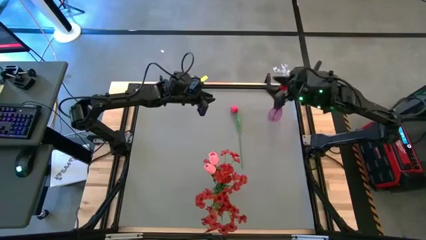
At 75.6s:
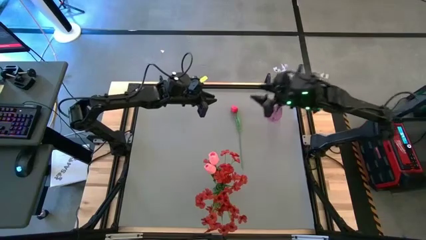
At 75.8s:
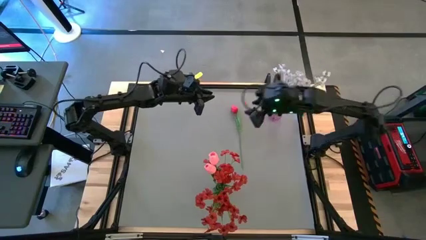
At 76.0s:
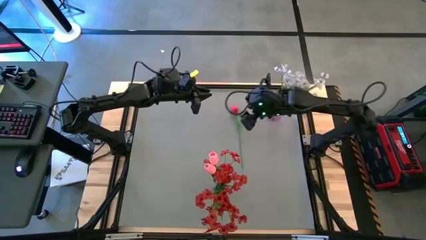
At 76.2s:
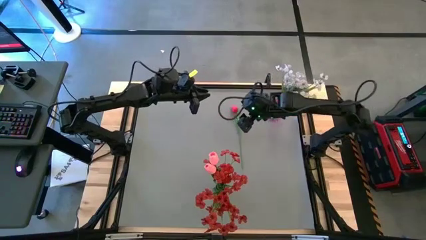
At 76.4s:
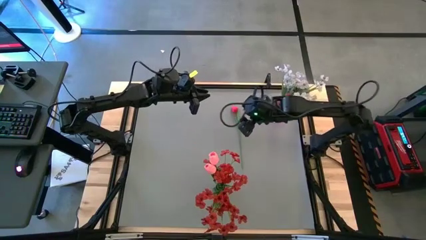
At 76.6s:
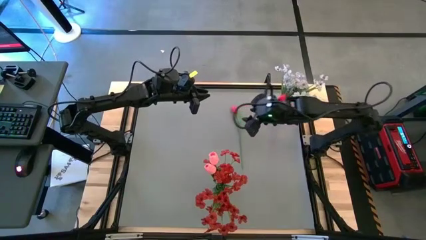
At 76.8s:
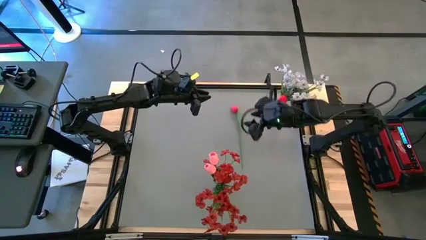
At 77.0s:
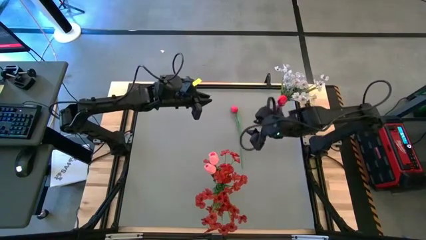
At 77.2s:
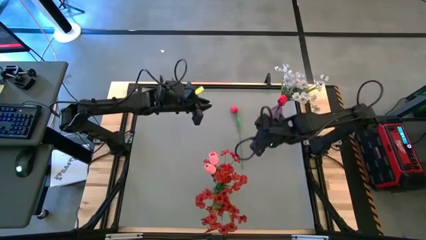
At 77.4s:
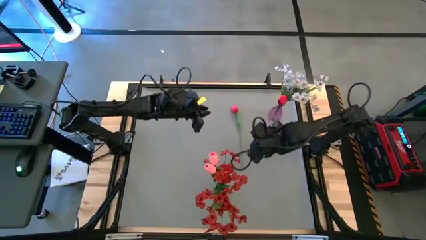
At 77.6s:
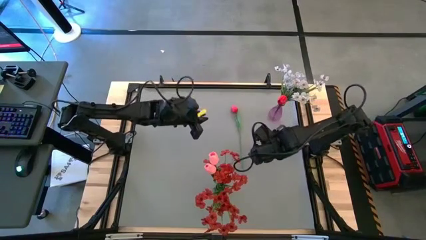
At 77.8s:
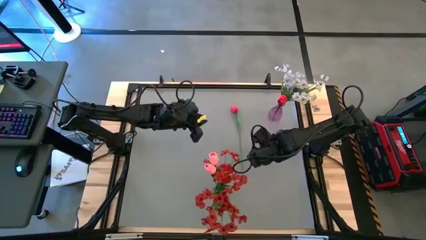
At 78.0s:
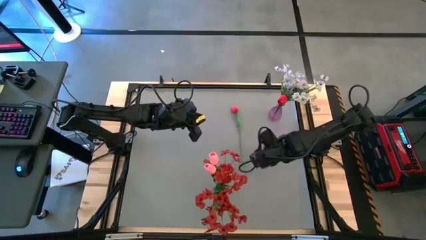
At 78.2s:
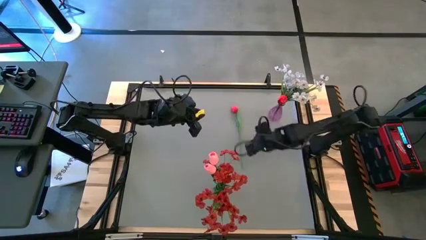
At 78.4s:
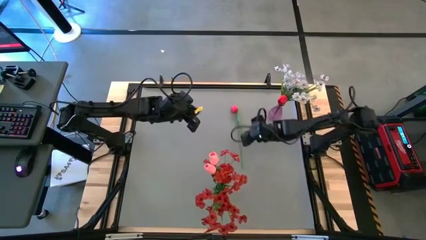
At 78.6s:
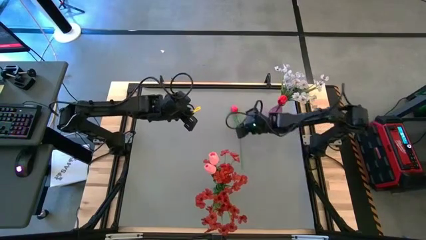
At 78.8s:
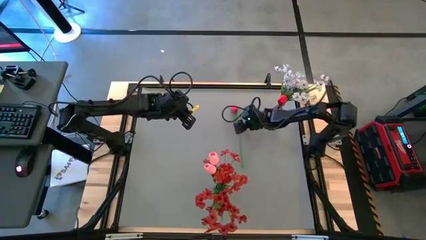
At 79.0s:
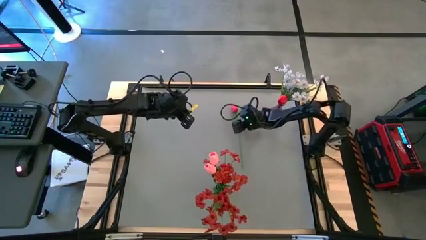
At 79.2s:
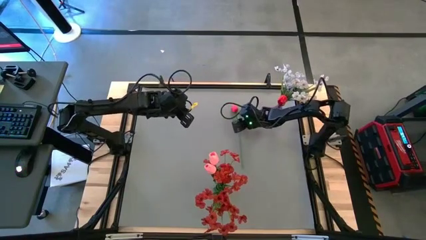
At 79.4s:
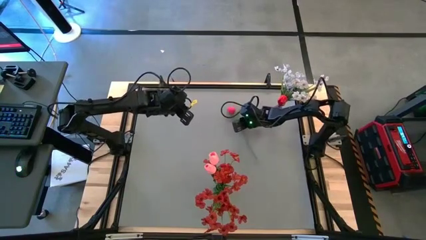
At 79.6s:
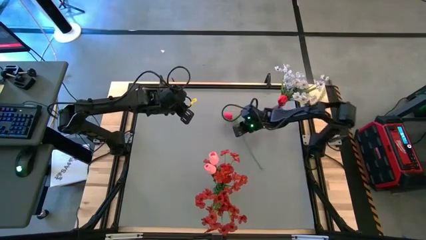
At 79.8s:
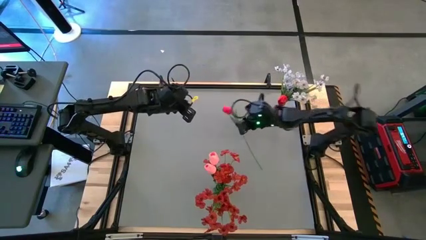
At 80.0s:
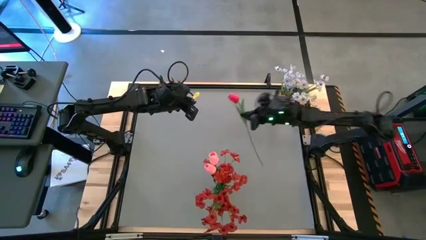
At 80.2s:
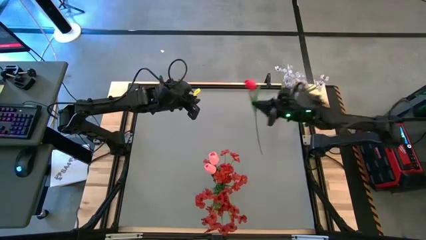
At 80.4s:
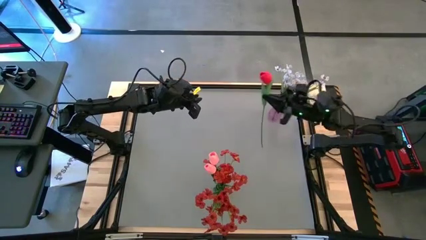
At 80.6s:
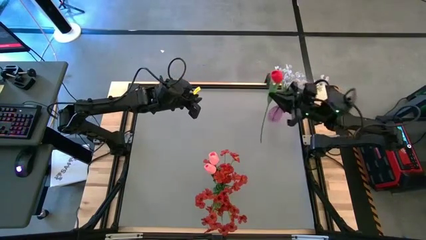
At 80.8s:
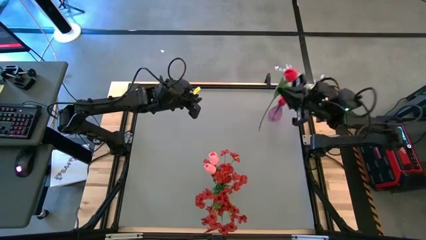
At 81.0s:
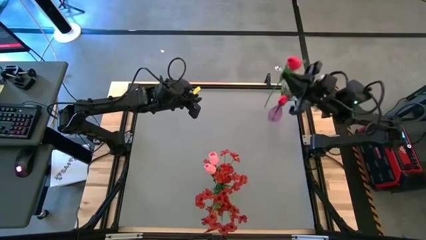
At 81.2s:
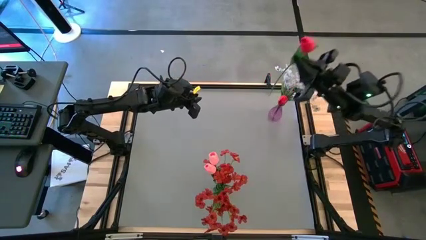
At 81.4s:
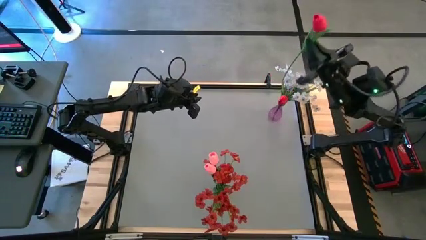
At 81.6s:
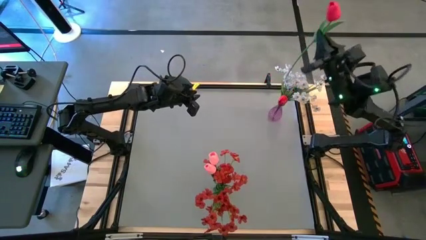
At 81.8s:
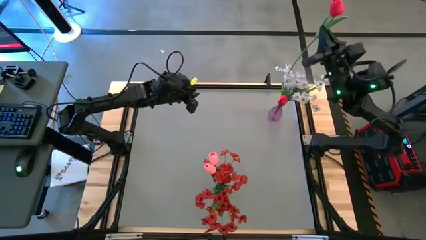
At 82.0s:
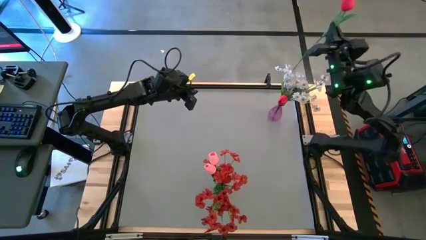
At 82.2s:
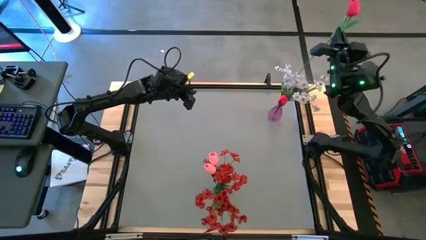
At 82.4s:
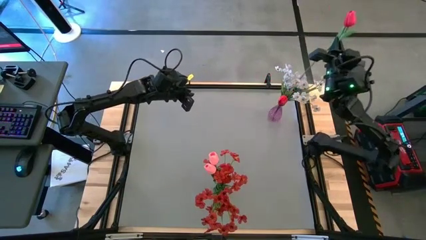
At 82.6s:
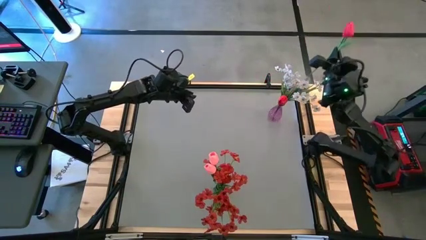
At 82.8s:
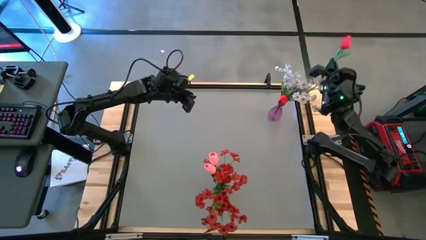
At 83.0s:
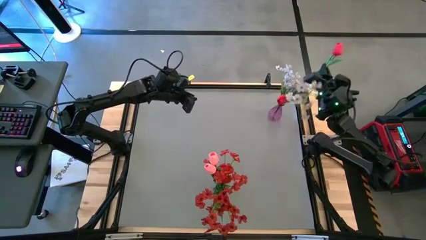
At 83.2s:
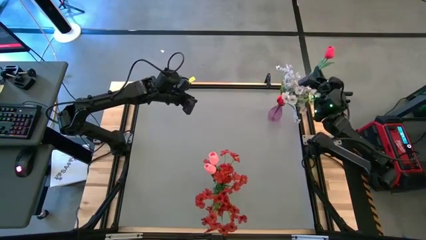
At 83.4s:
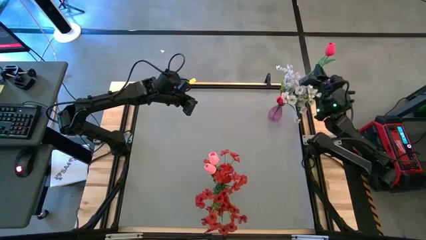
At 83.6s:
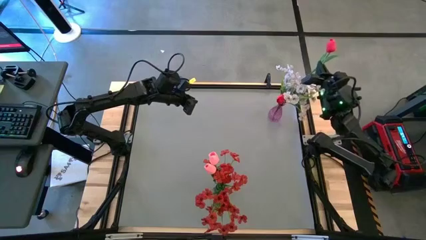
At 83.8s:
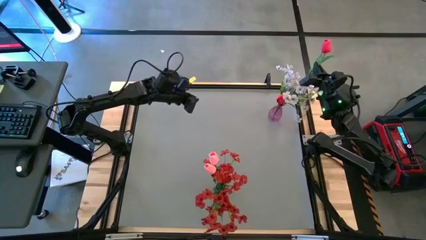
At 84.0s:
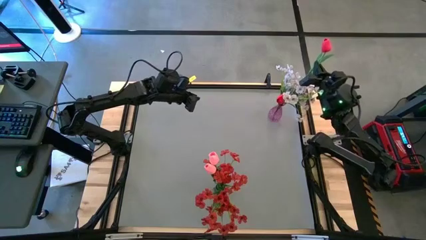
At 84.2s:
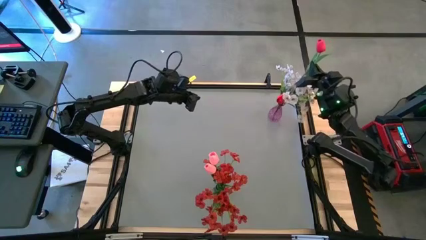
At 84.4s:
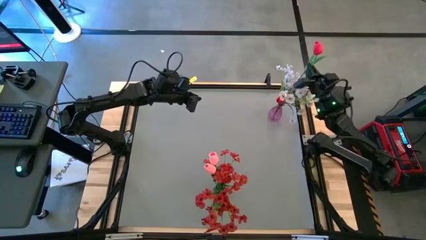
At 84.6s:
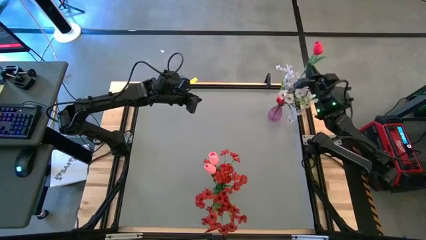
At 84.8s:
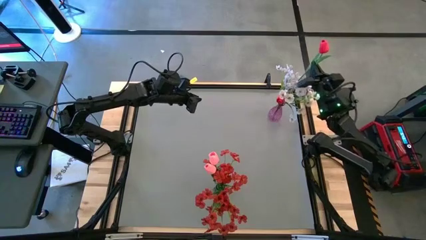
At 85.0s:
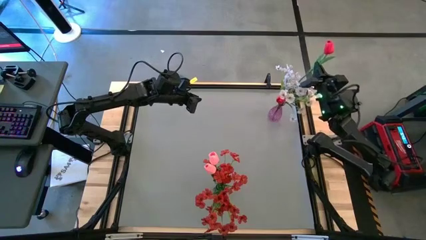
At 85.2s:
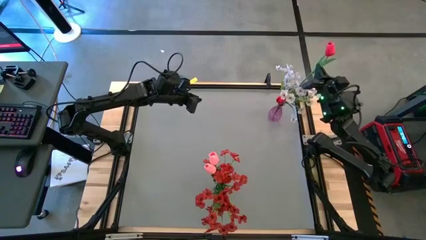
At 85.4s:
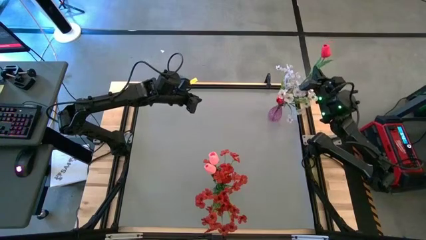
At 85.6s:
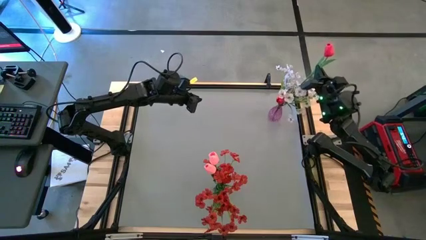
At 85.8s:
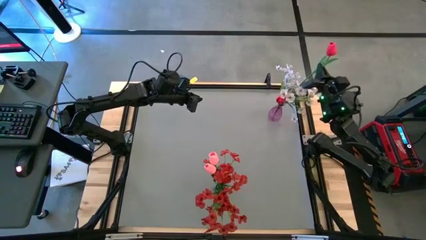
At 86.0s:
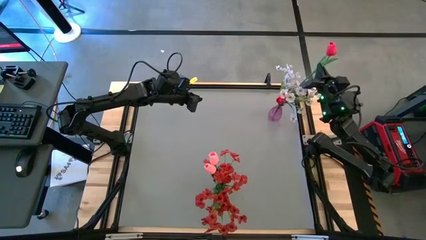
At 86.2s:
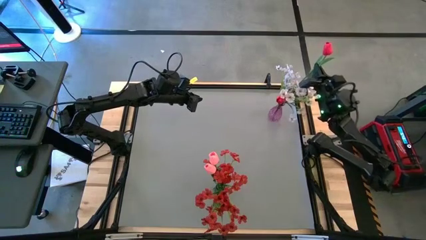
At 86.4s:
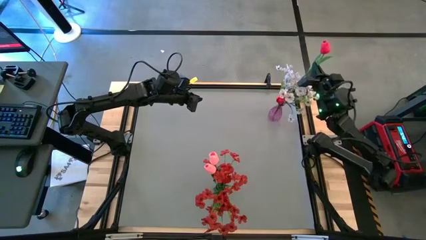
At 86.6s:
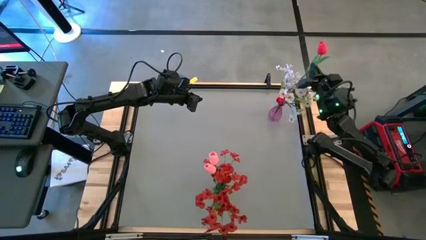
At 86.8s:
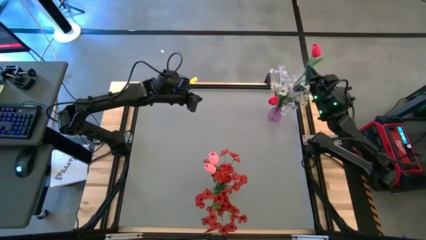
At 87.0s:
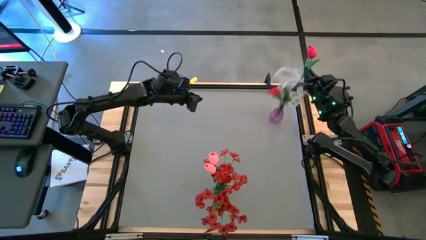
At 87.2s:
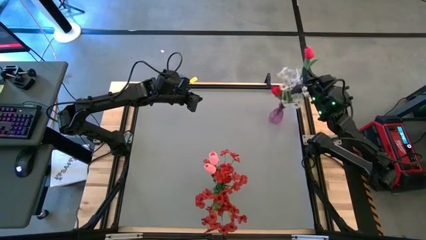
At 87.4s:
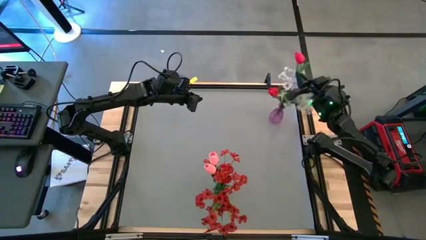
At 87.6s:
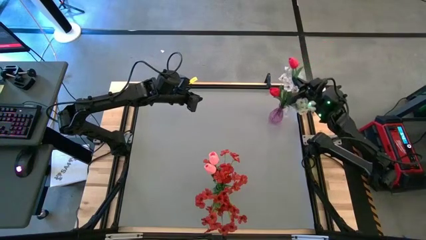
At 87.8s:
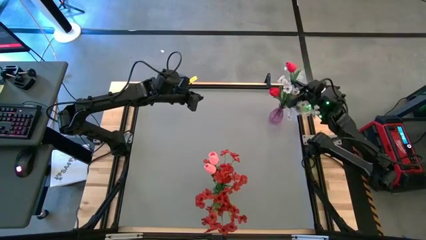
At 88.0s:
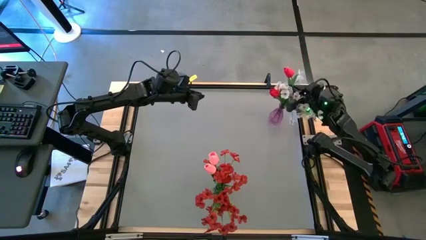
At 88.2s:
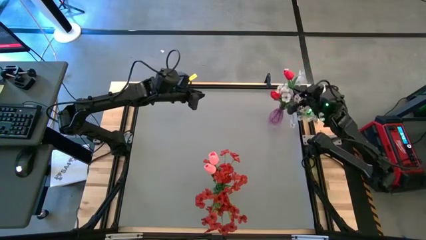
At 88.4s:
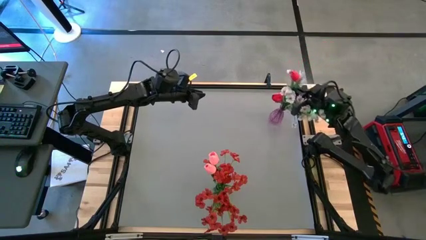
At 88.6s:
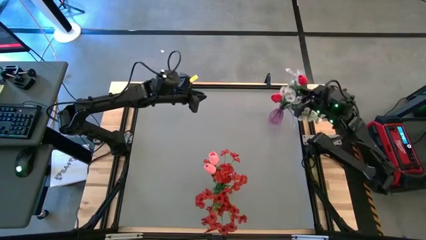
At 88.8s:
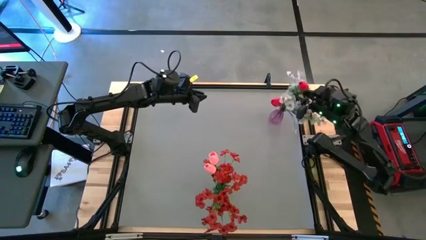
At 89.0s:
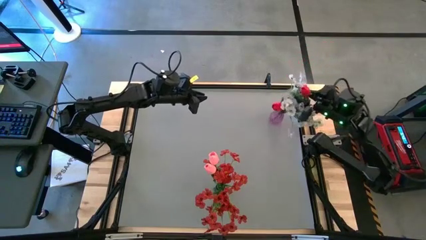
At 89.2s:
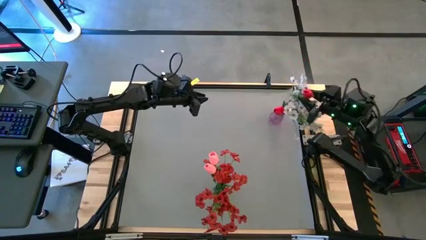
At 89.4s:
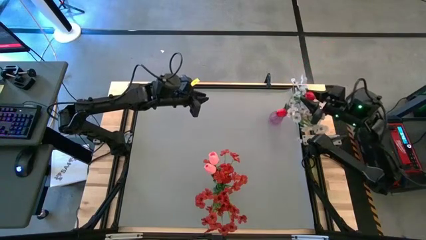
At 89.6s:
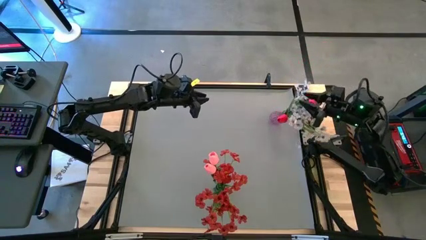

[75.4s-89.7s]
Task: Sort flowers into vase by color
Put the red flower into the purple vase

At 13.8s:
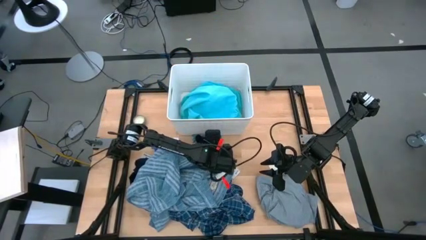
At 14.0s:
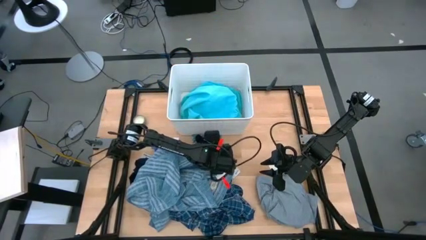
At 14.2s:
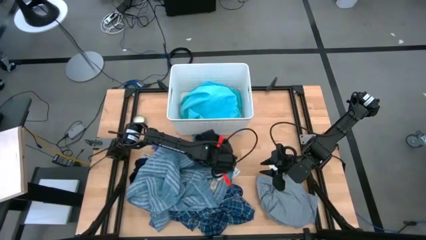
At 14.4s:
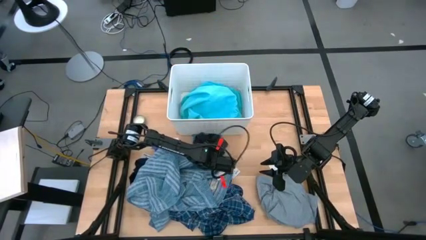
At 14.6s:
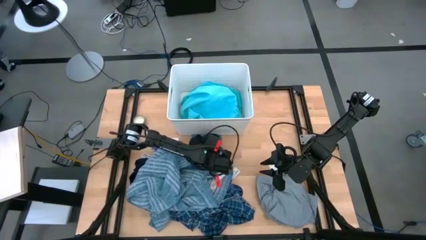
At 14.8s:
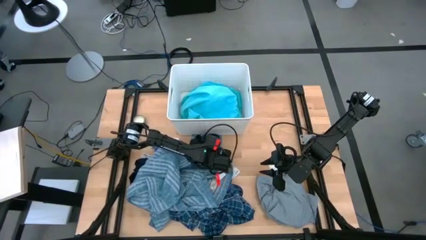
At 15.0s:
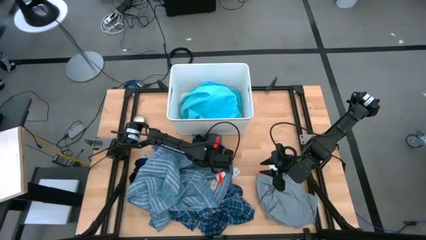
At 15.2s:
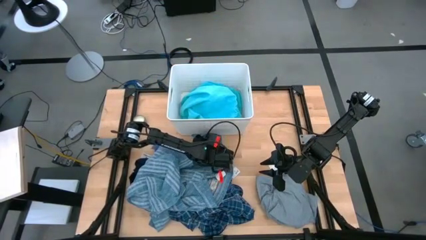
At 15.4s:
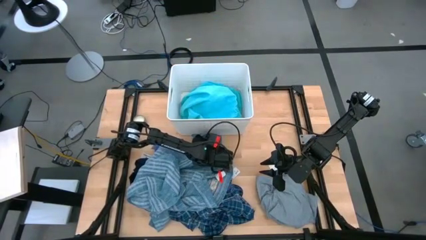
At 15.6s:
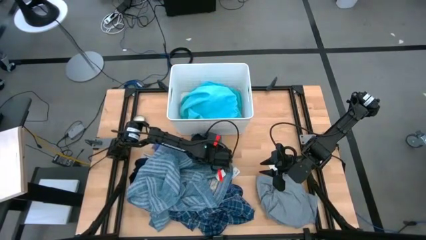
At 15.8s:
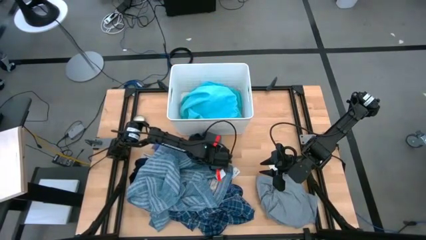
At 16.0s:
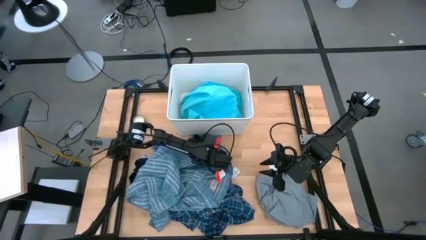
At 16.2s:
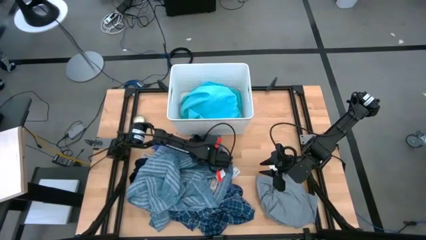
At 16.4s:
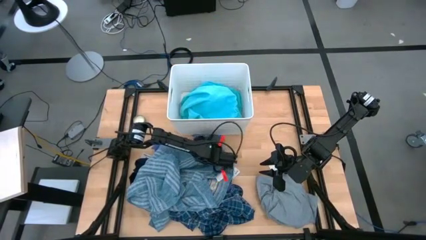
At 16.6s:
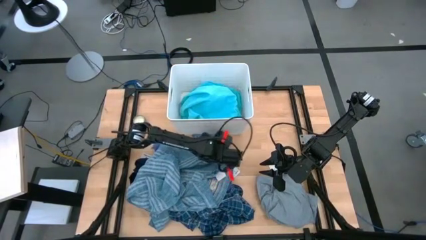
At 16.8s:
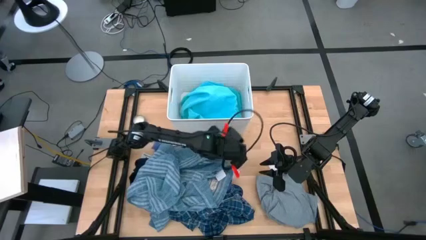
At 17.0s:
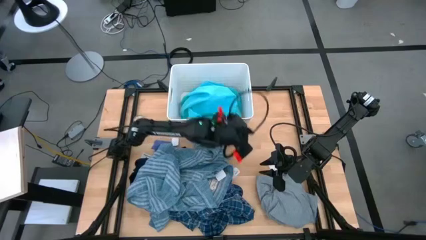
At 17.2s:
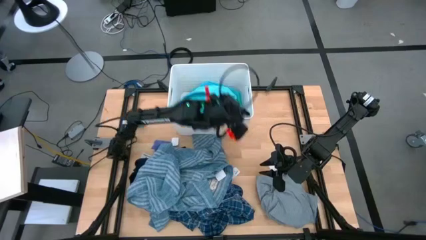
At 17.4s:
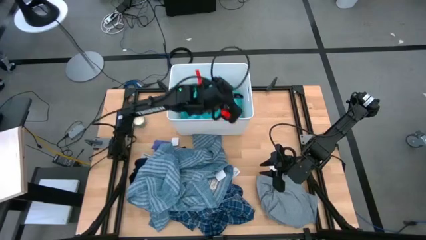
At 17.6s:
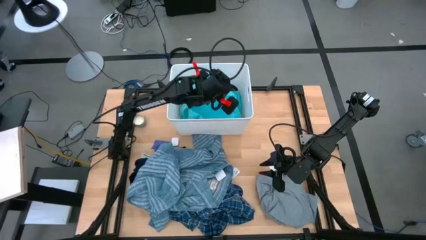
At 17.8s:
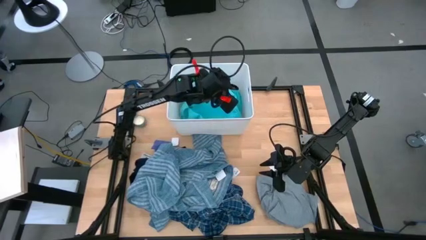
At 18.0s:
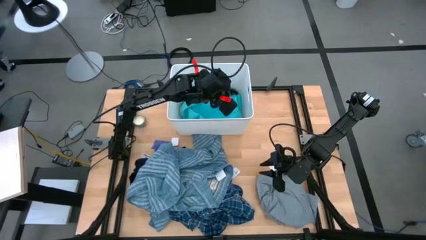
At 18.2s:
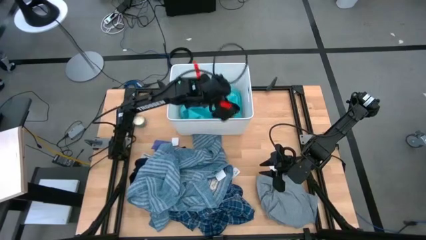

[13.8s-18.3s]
Task: Sort clothes
Put the right black sock into the white laundry bin
